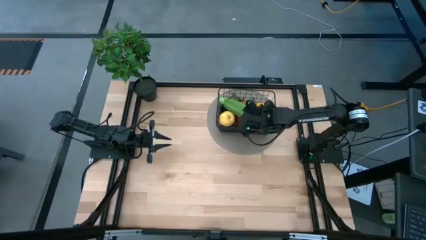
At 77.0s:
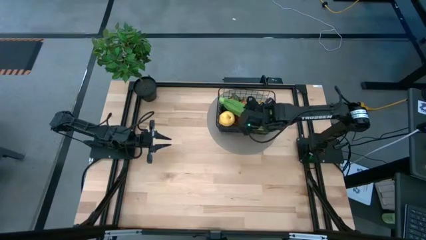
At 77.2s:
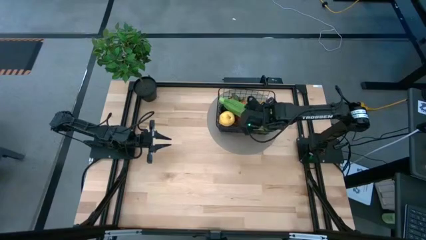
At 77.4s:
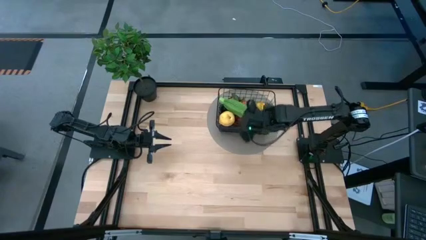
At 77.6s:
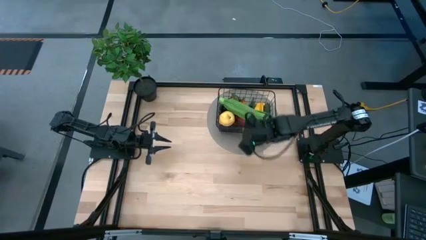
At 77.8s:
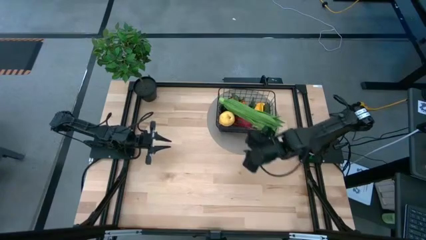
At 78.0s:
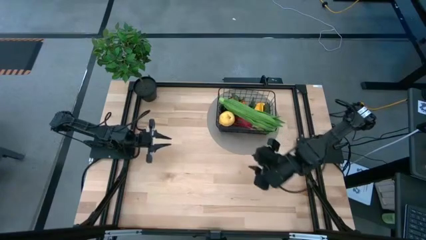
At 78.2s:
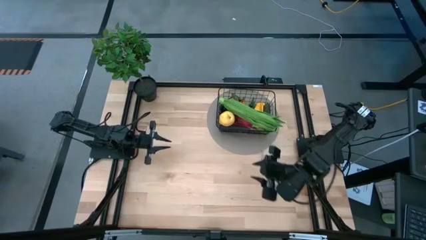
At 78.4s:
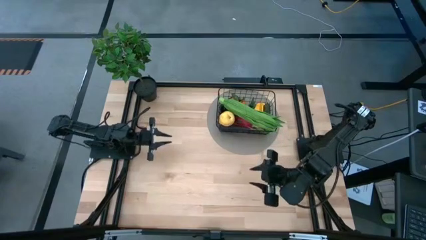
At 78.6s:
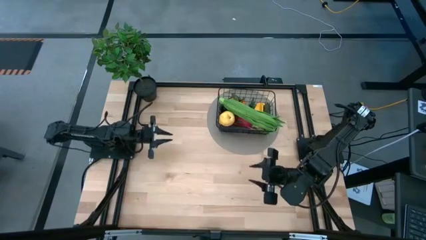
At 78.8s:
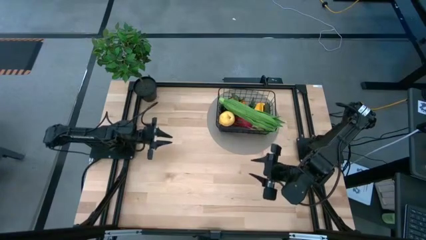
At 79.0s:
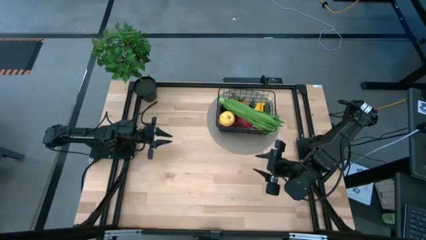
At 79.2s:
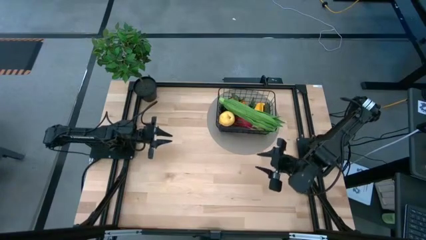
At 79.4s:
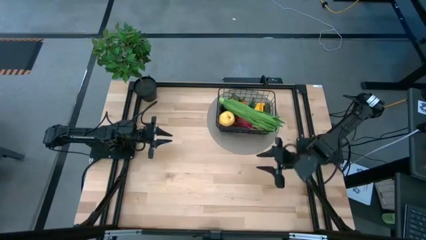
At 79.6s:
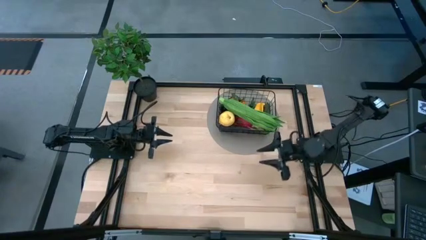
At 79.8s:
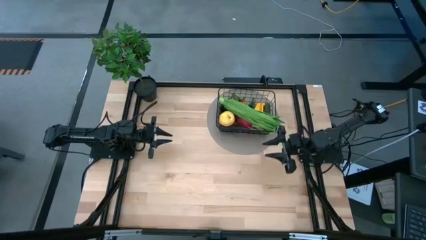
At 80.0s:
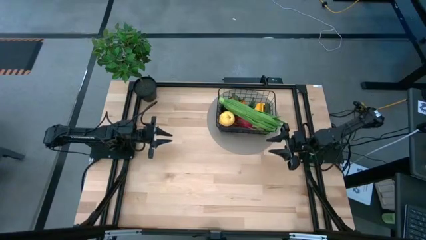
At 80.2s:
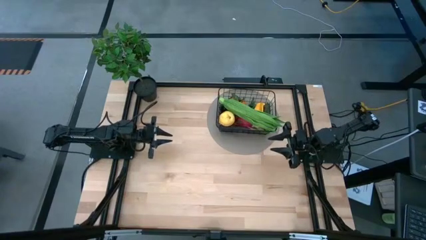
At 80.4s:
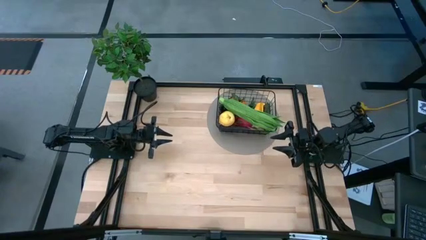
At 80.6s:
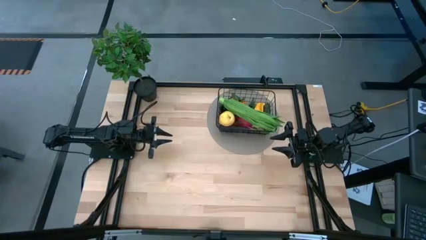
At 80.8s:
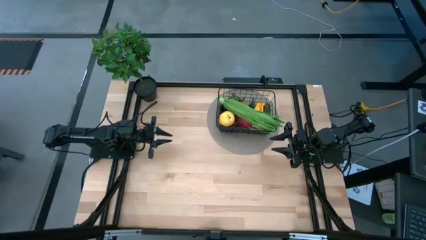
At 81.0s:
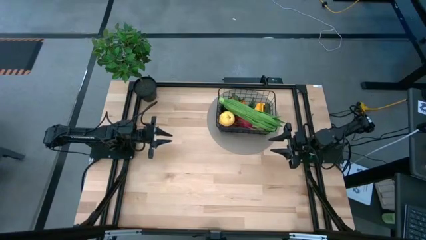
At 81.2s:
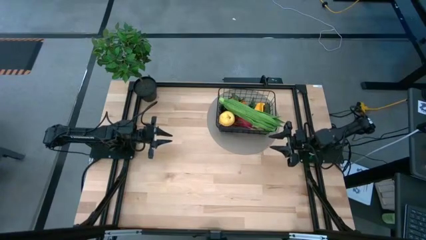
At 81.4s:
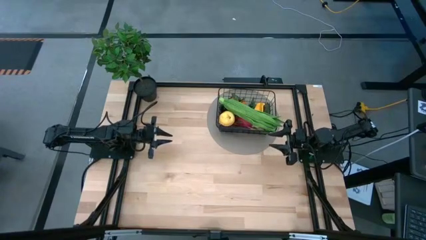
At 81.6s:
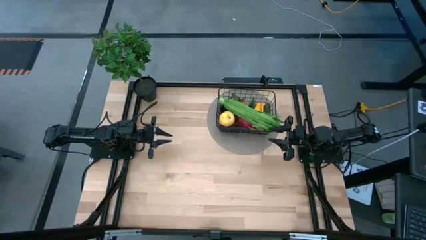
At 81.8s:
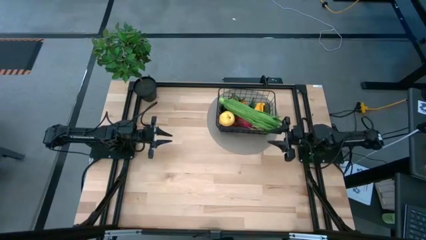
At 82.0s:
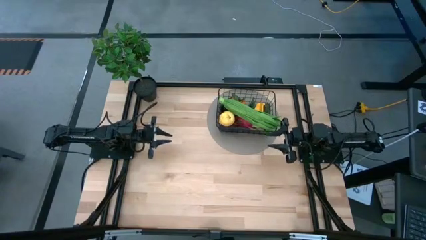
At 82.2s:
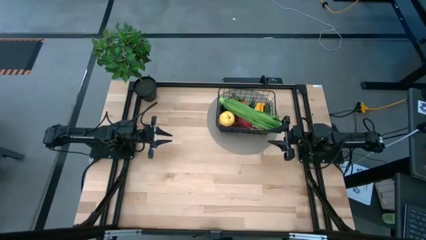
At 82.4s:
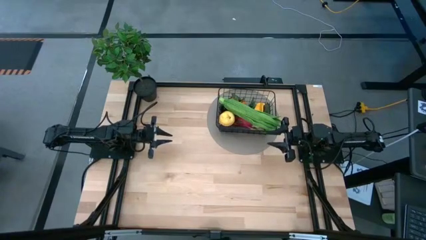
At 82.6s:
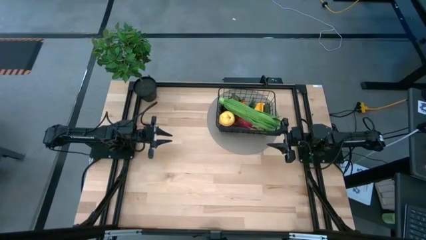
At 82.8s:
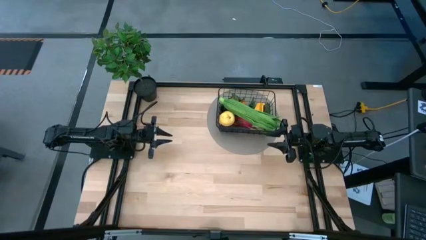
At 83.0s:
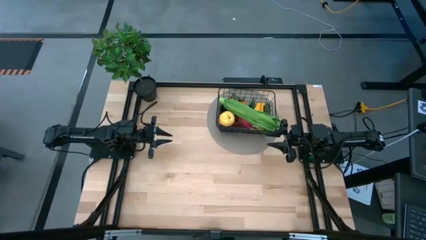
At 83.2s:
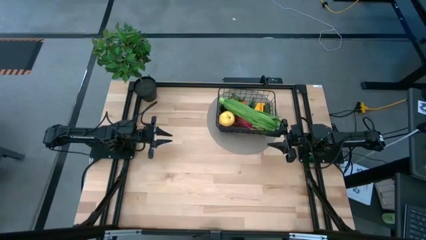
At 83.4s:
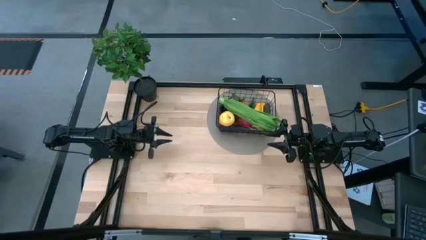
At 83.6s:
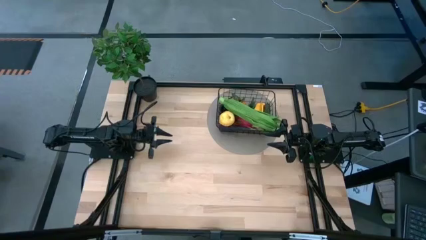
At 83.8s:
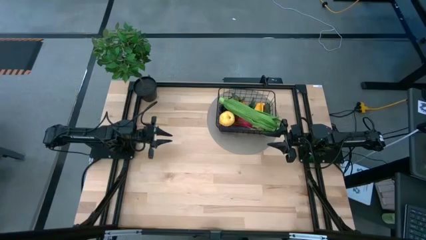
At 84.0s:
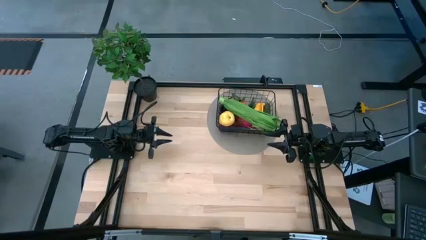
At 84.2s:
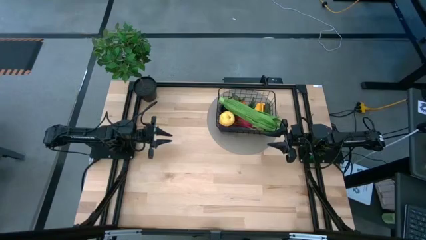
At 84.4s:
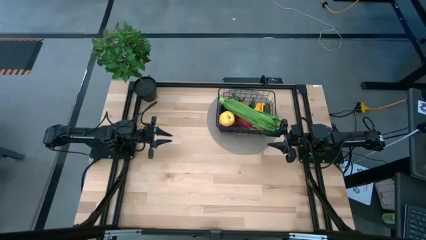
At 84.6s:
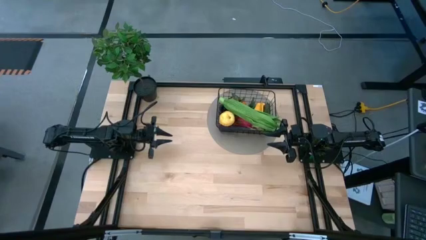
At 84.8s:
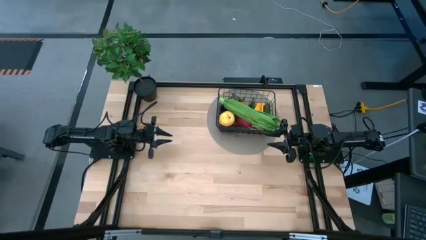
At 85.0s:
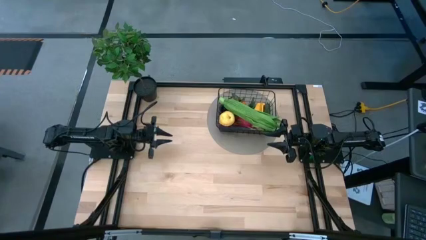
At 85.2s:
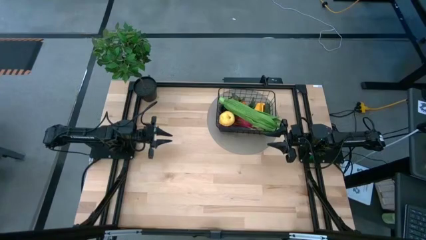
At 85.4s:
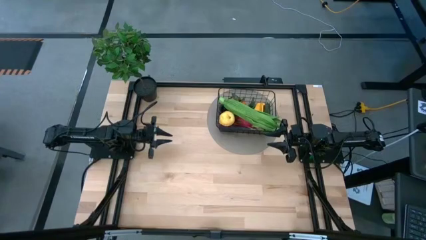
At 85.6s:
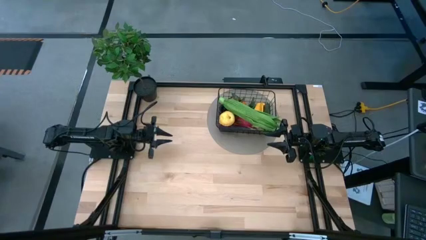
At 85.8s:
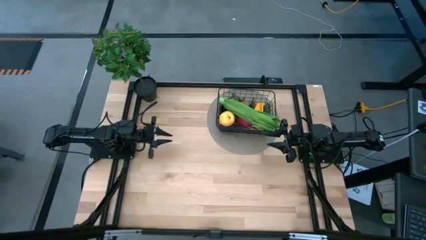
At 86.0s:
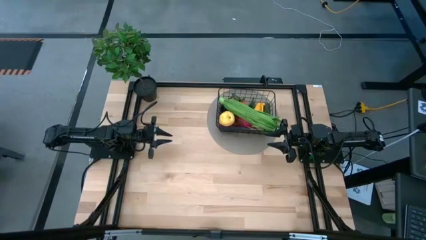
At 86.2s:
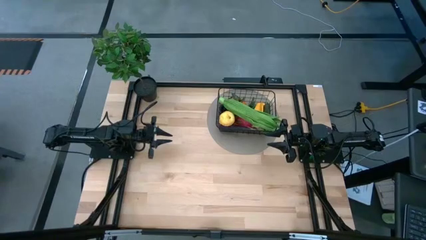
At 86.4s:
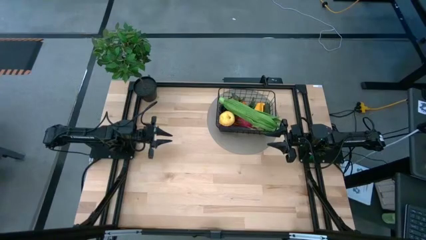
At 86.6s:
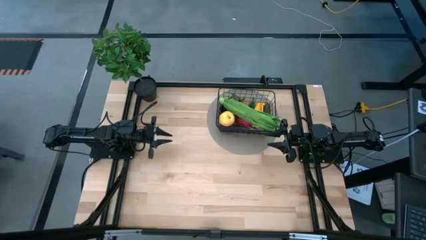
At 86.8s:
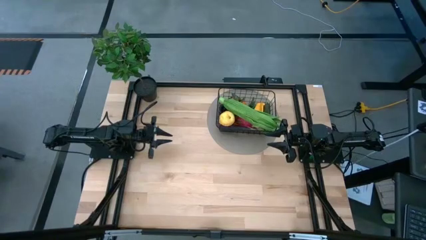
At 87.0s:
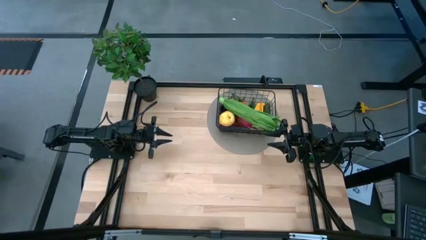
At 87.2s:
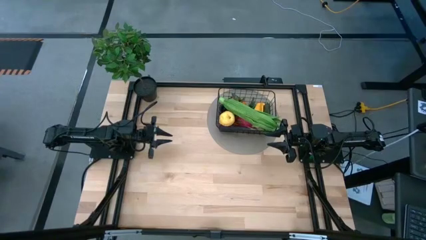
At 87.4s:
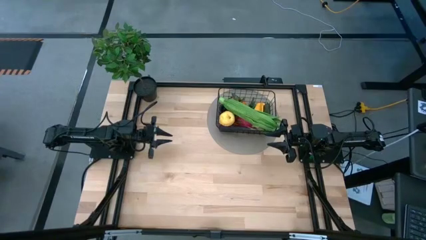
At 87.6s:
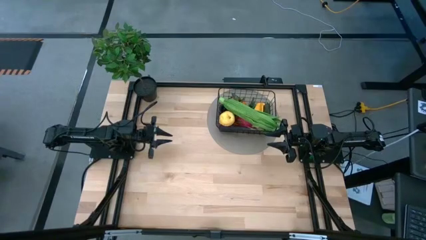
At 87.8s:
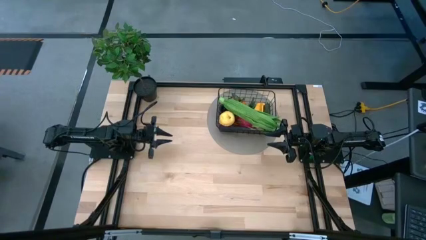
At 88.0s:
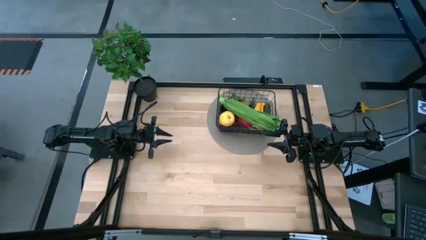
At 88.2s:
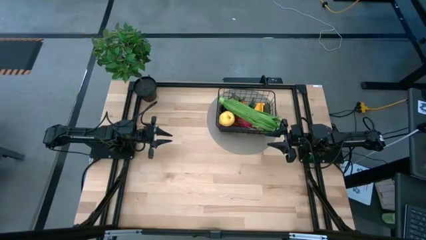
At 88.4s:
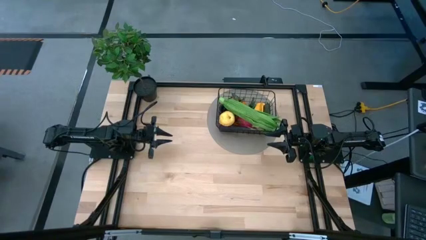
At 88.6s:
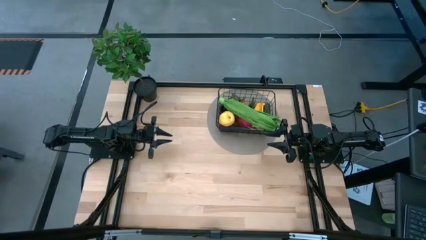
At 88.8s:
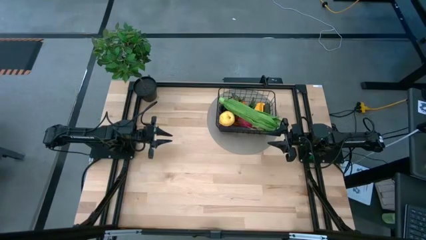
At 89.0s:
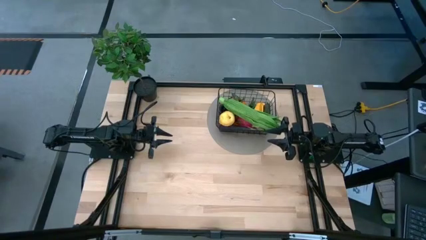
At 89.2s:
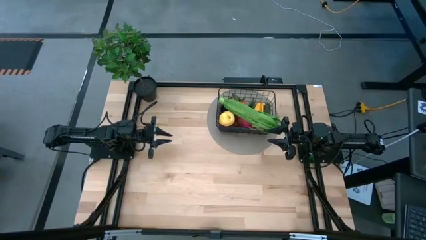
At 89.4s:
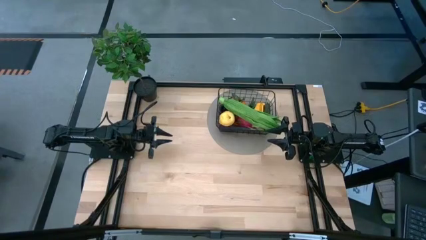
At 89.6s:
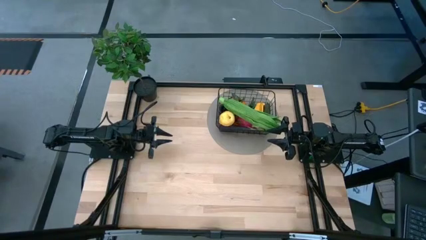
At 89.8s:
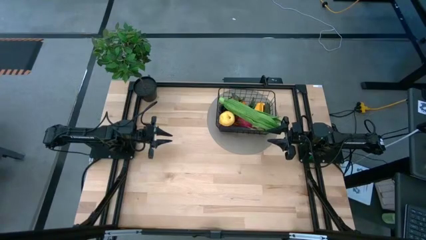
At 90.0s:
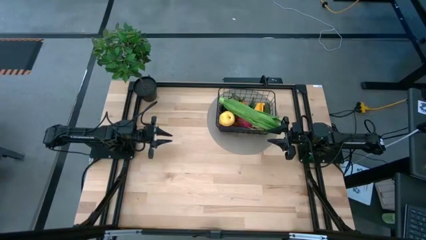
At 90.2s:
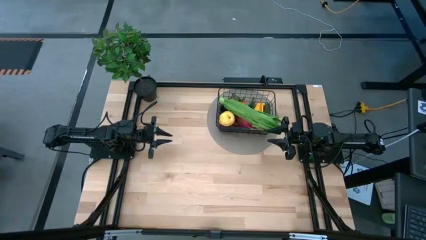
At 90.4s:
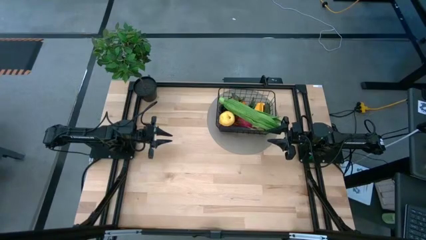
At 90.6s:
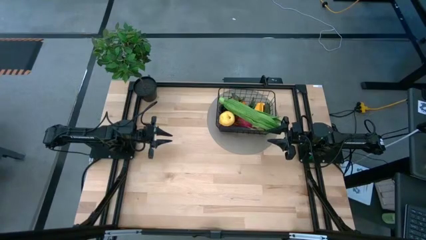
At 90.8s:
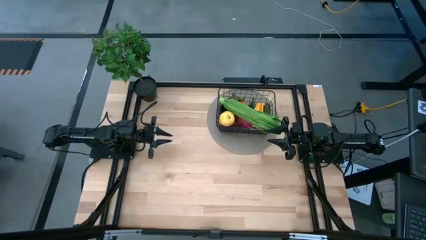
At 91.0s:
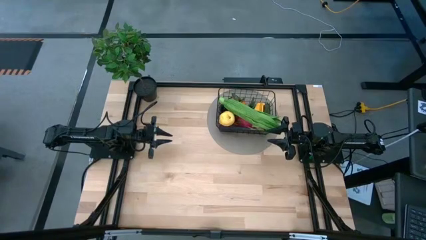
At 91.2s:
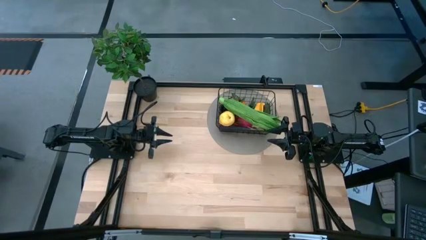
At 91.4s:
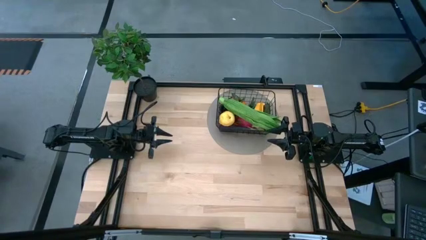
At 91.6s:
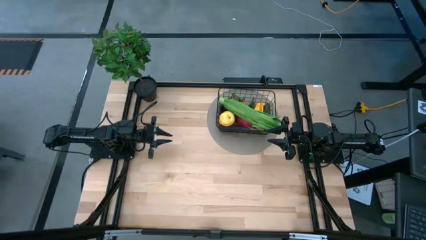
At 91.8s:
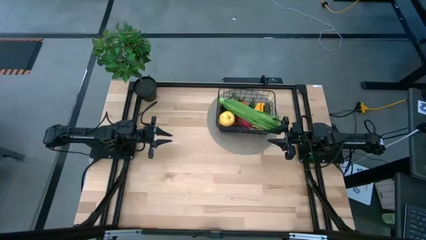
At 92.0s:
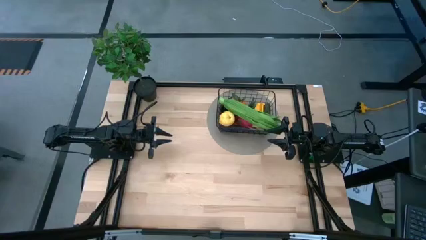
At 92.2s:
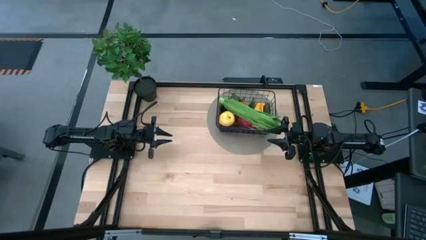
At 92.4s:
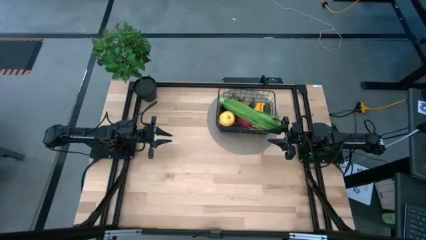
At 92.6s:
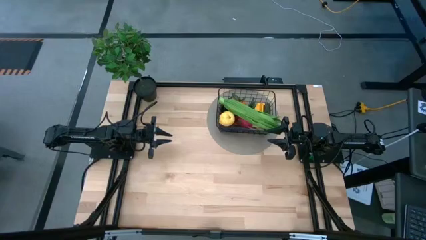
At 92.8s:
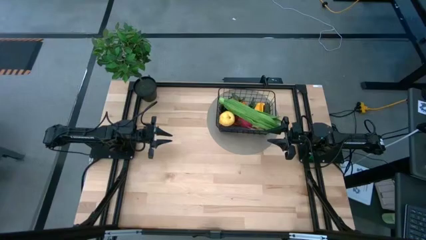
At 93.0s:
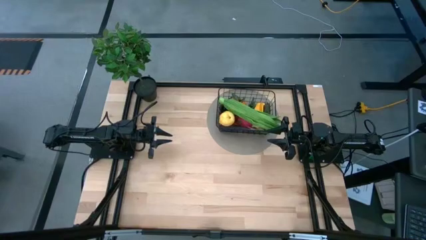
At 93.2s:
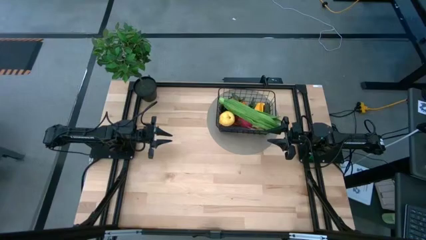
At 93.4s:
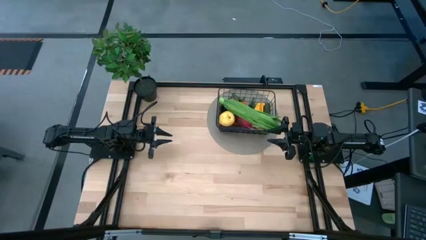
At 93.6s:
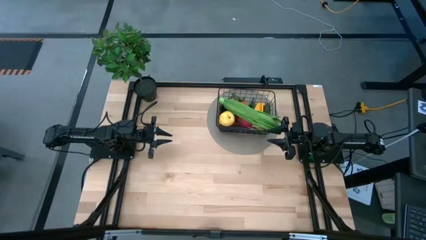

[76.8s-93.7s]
Task: Build produce basket
Return to Home Position
